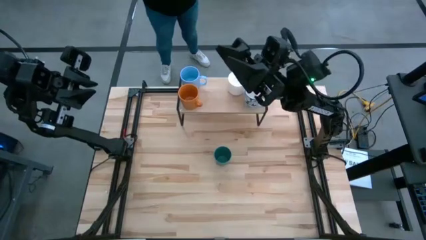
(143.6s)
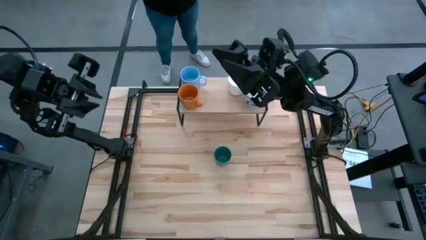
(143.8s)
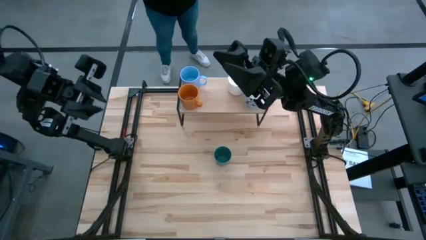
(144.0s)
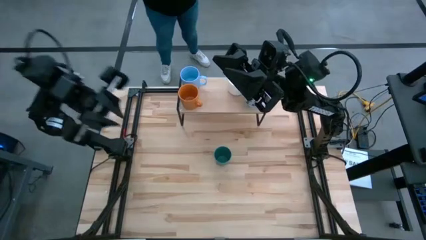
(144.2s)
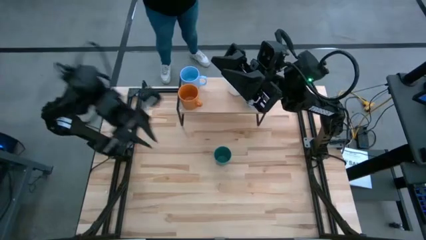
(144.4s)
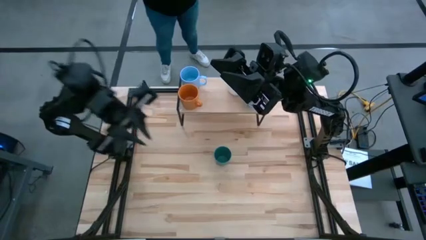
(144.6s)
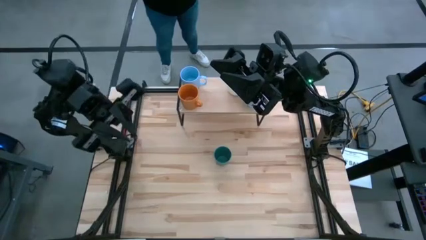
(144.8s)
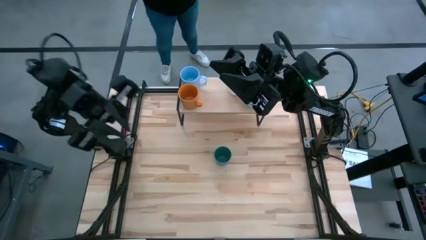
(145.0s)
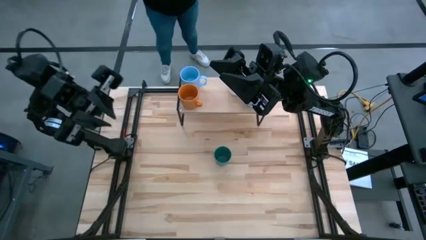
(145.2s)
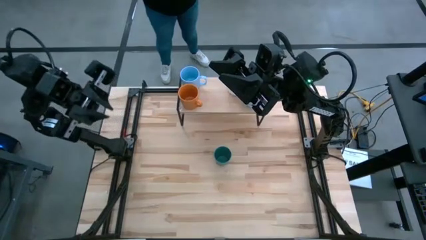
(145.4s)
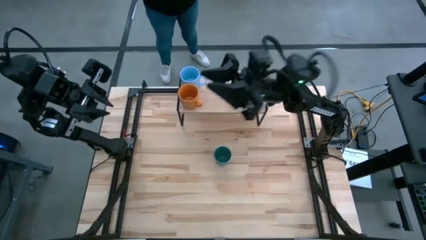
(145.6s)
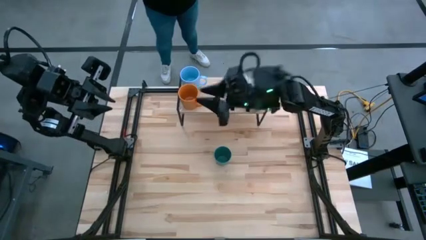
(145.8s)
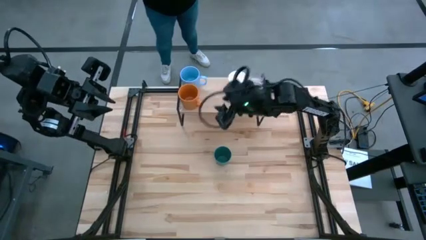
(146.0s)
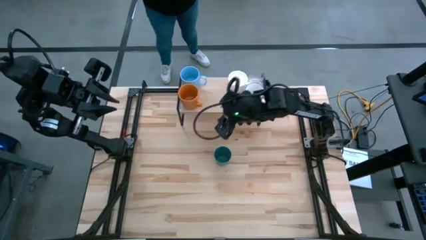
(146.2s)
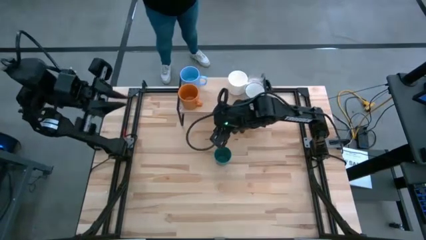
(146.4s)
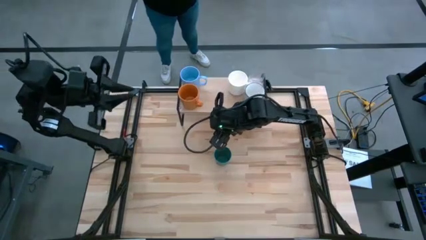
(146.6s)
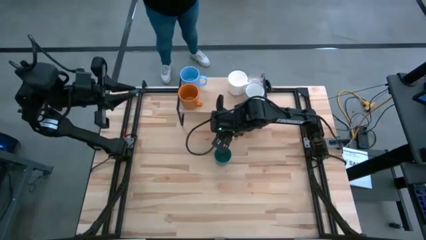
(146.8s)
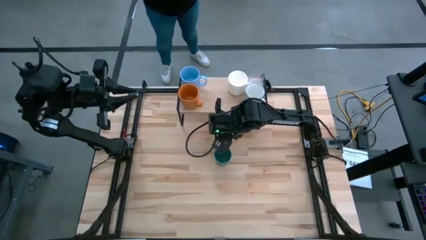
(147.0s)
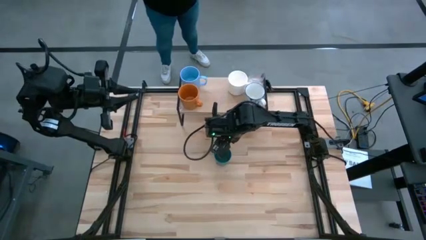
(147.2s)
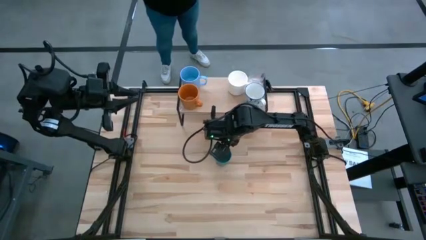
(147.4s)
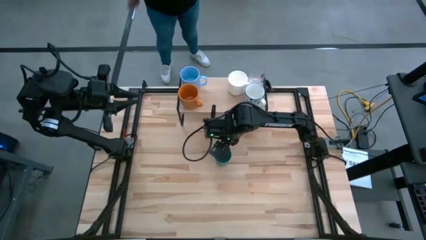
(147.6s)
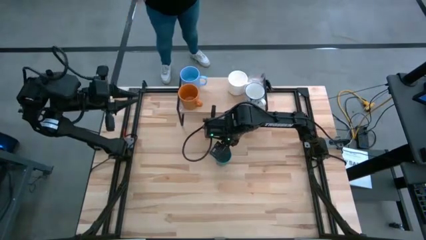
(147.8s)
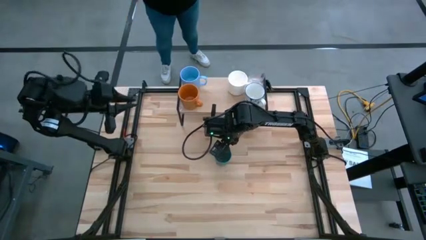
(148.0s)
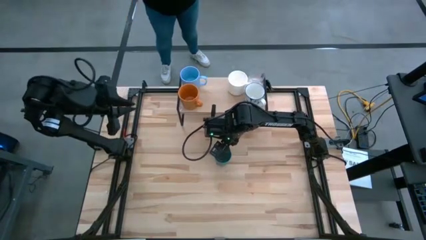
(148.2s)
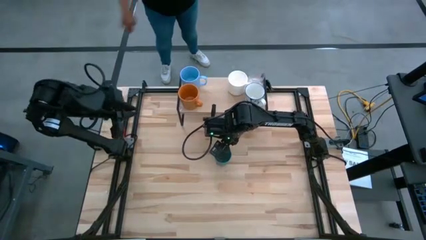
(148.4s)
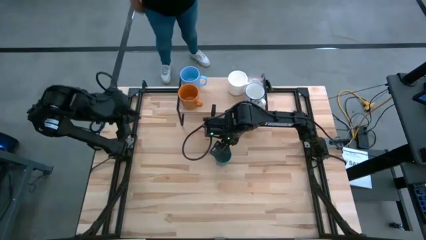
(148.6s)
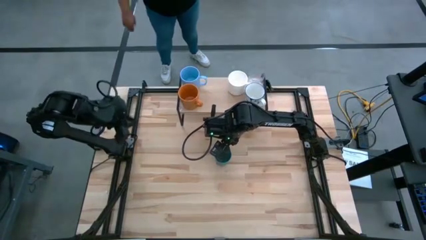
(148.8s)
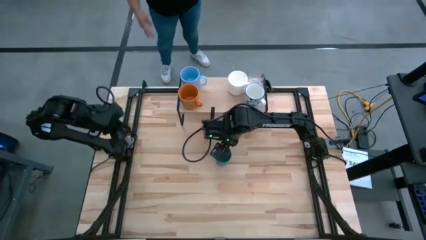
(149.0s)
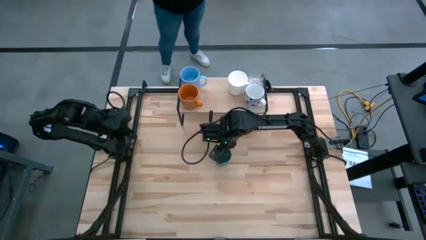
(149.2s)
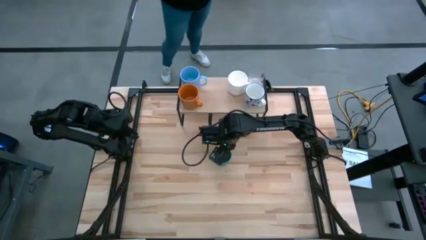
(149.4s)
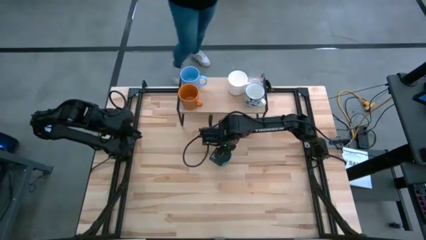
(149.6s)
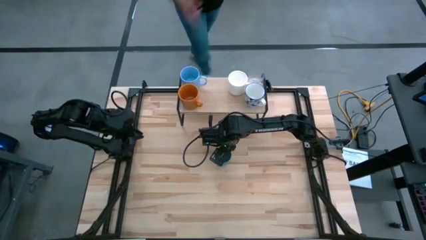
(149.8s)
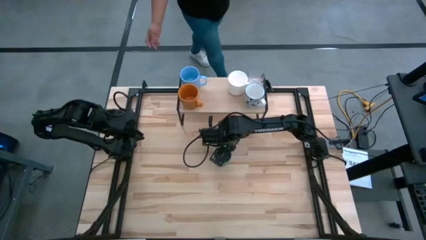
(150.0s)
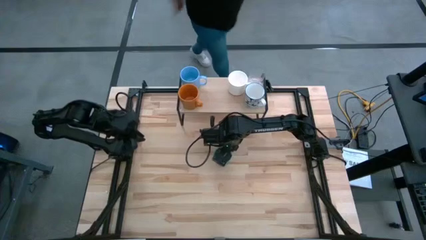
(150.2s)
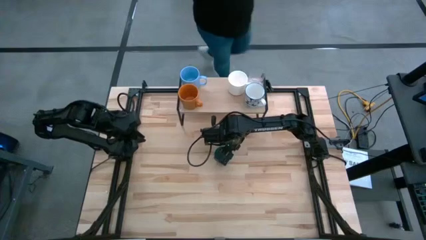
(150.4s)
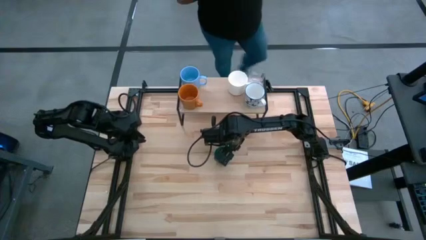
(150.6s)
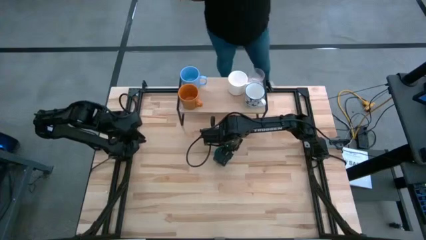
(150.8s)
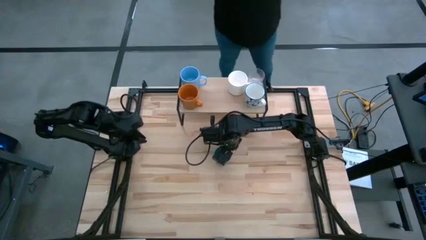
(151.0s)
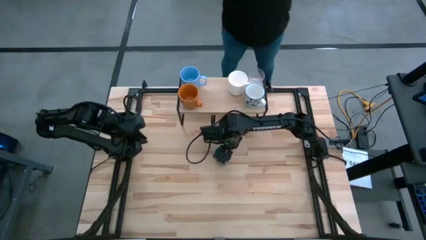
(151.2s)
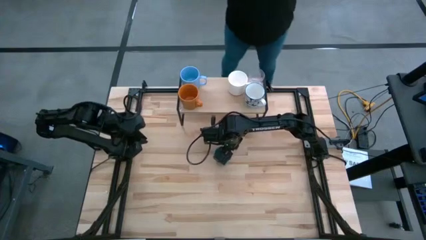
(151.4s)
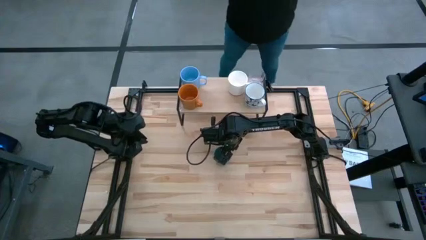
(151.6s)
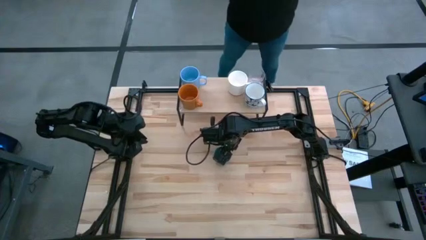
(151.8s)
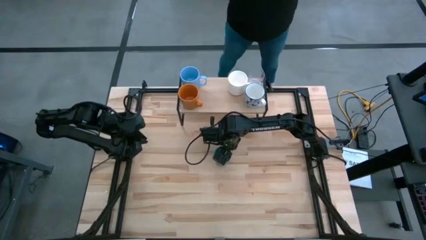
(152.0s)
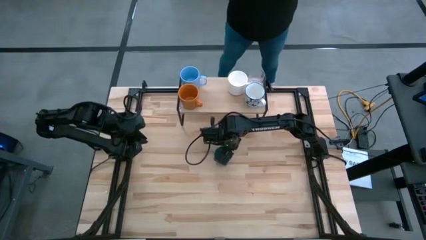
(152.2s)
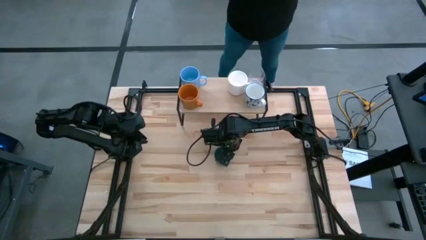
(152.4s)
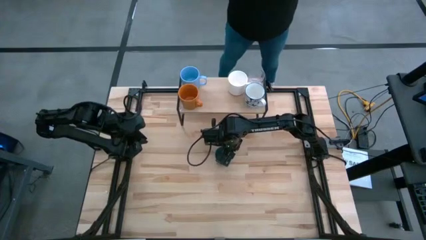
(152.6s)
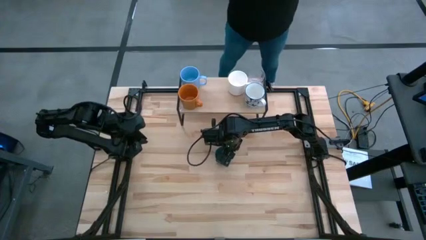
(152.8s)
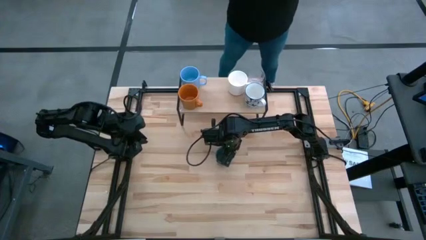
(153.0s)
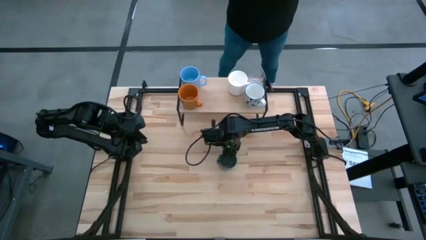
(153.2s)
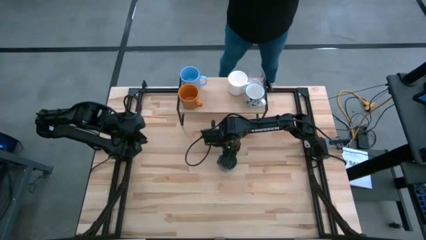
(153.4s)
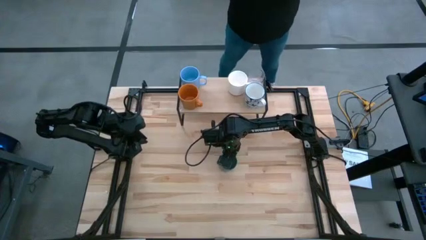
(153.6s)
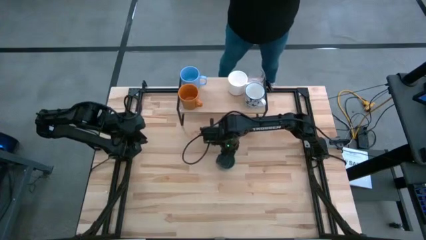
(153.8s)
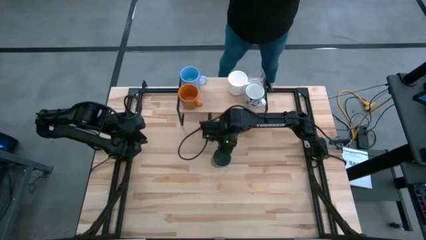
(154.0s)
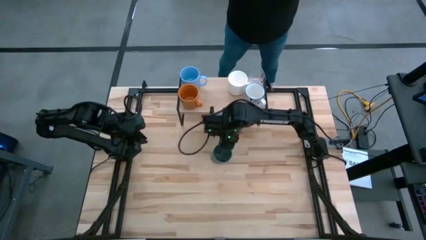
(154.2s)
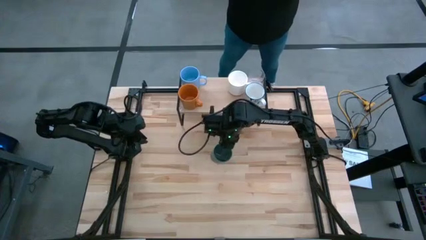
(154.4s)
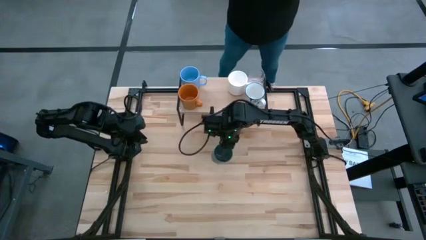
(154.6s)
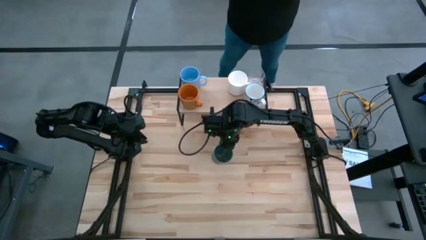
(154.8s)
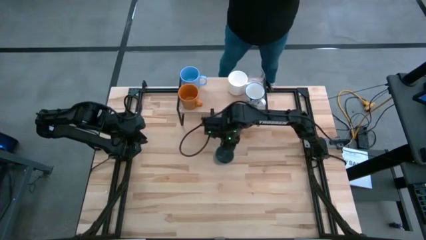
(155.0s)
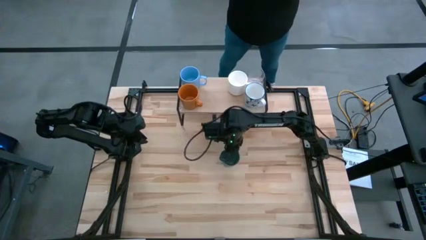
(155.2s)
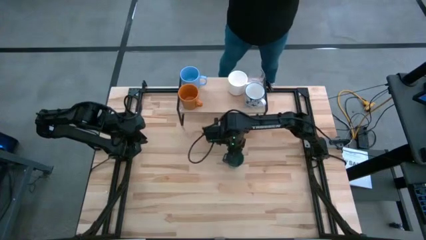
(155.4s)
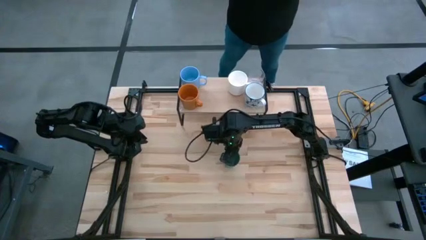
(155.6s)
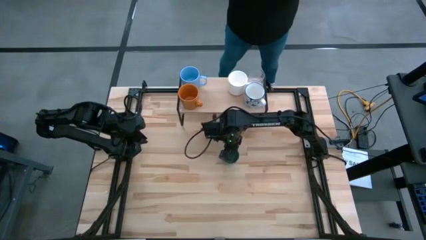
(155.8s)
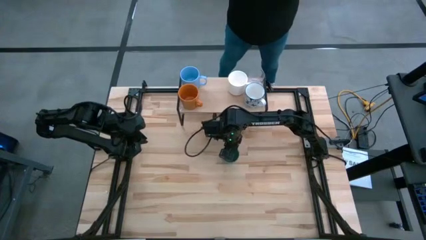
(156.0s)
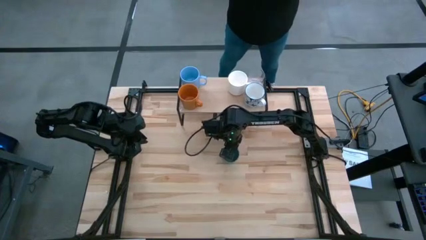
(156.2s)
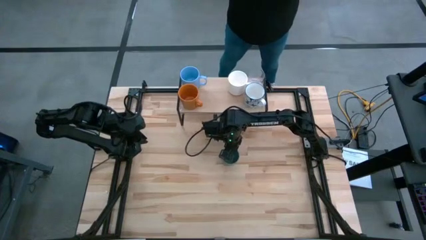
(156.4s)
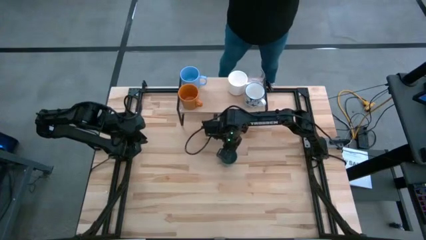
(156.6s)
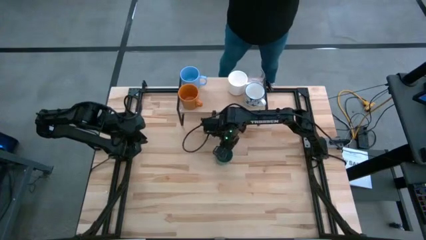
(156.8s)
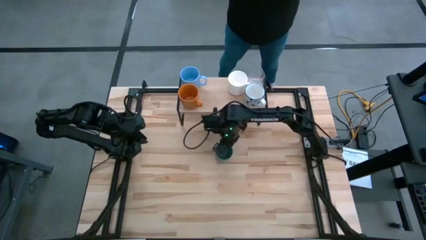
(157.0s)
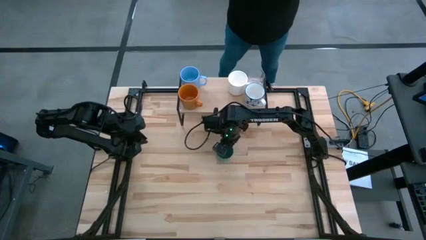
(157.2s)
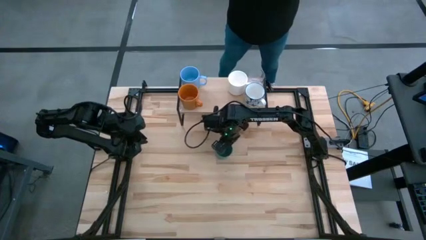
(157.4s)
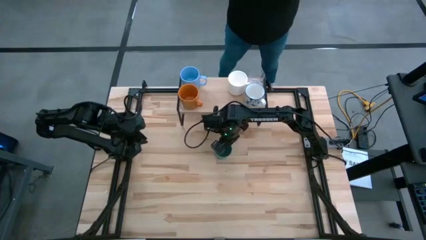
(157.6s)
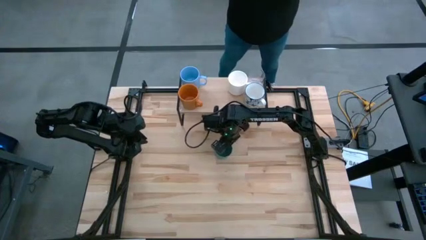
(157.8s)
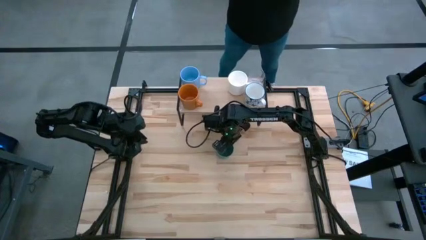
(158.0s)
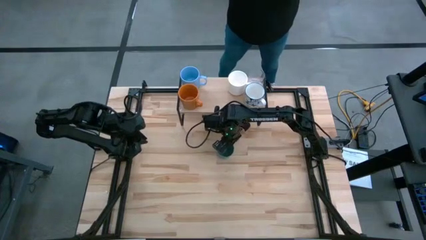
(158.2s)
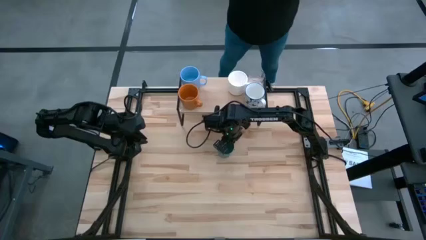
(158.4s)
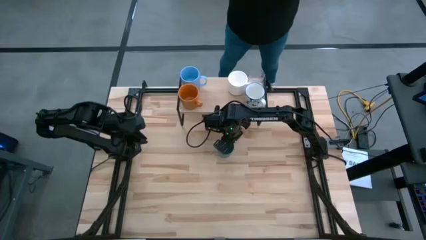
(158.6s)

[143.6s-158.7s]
Task: Stack small to large cups/mugs on shelf
Put the green cup on the shelf
